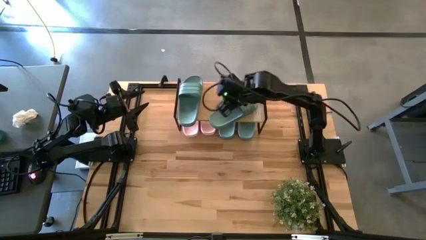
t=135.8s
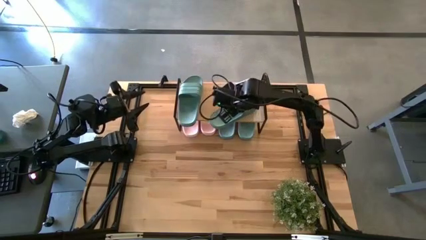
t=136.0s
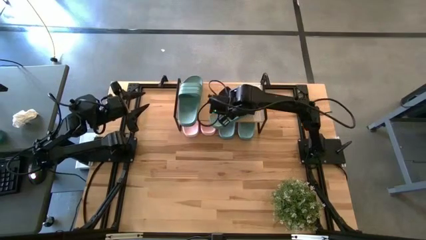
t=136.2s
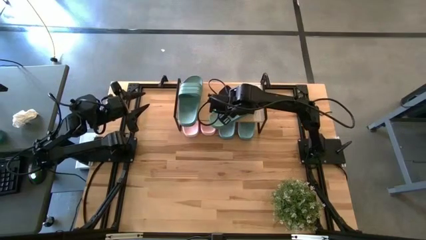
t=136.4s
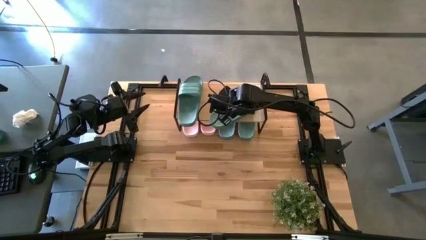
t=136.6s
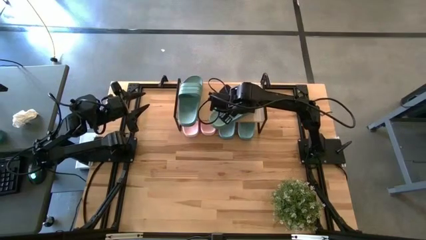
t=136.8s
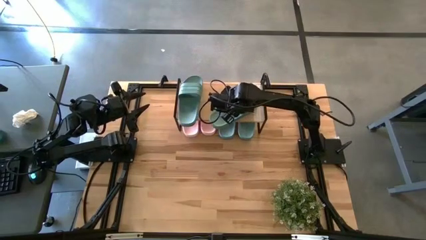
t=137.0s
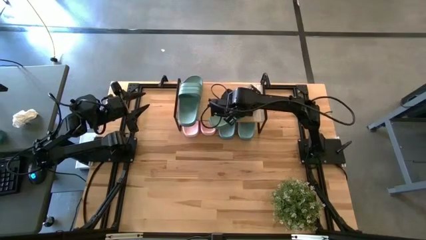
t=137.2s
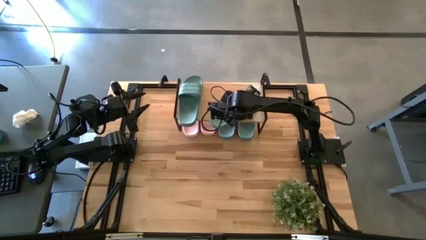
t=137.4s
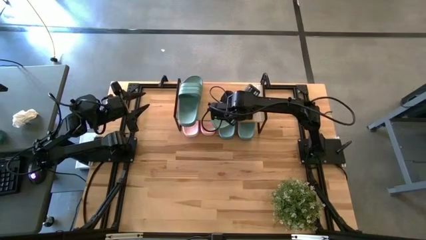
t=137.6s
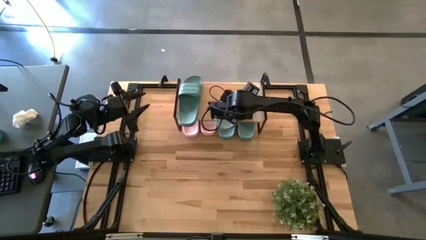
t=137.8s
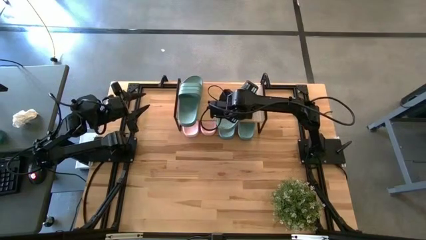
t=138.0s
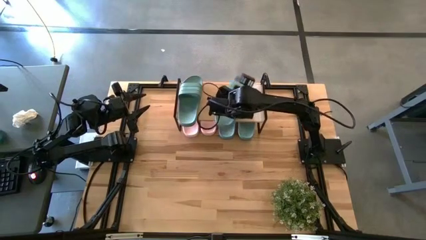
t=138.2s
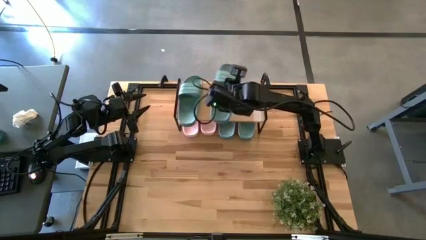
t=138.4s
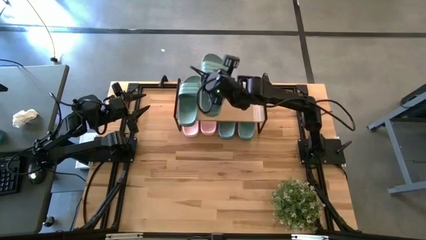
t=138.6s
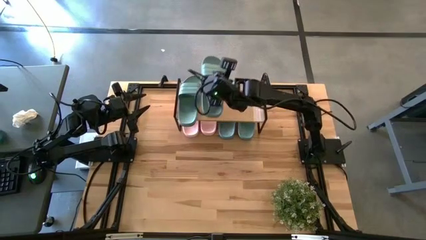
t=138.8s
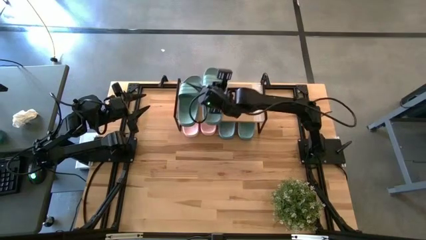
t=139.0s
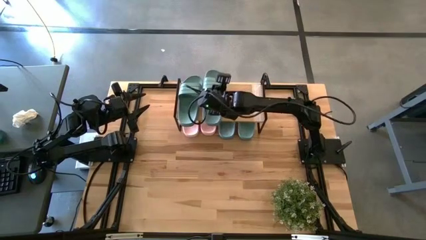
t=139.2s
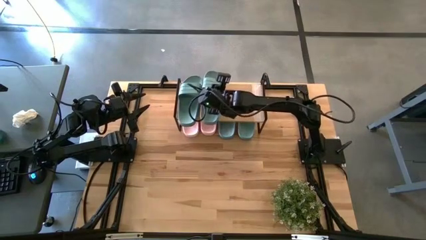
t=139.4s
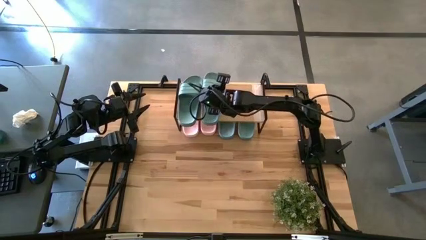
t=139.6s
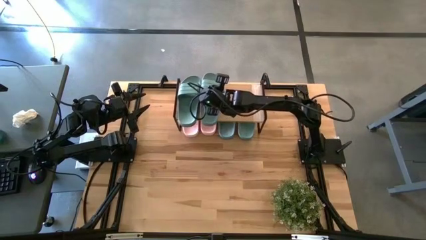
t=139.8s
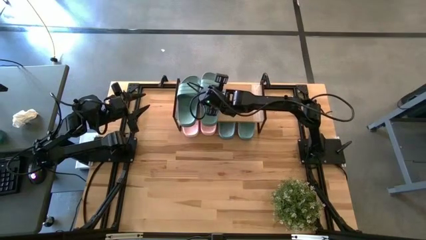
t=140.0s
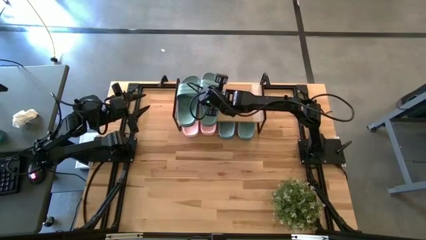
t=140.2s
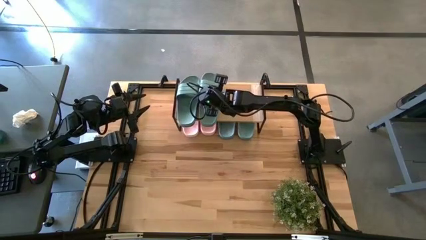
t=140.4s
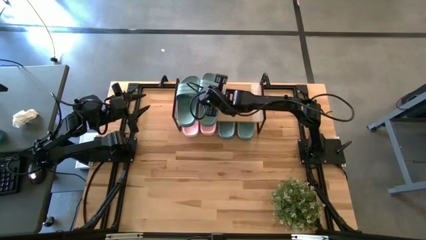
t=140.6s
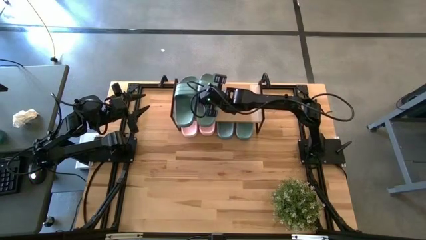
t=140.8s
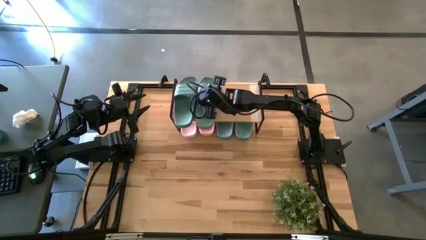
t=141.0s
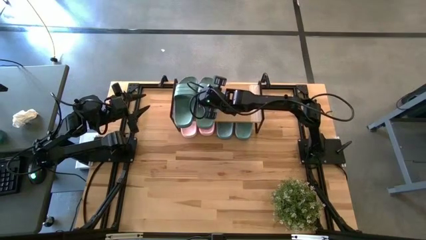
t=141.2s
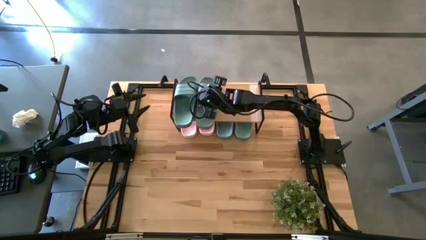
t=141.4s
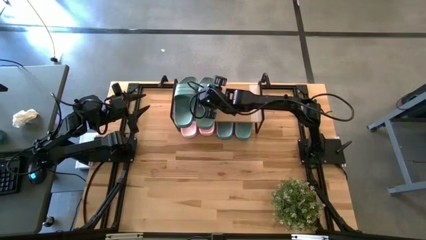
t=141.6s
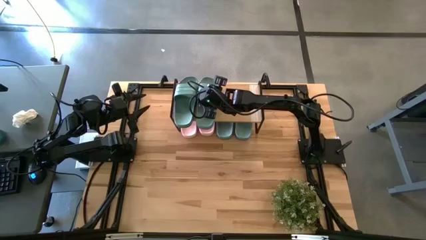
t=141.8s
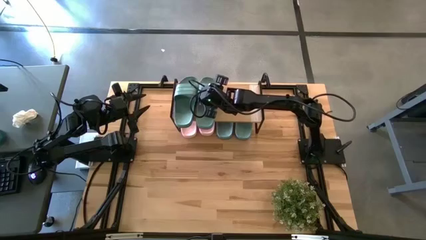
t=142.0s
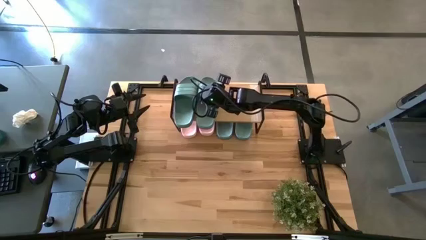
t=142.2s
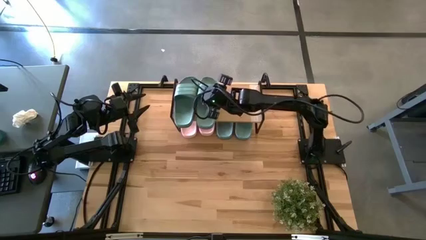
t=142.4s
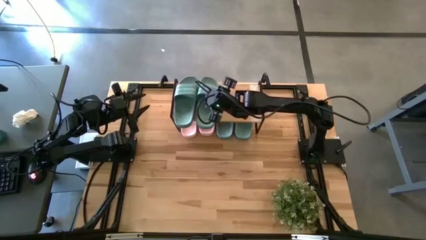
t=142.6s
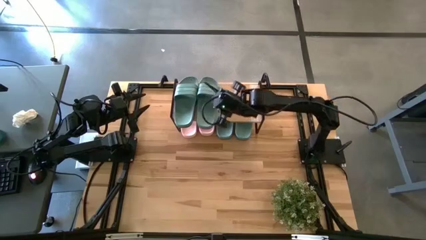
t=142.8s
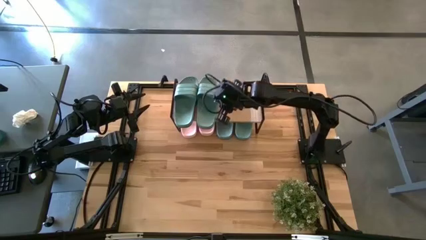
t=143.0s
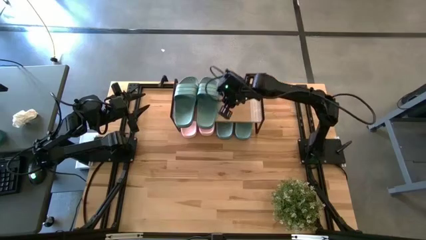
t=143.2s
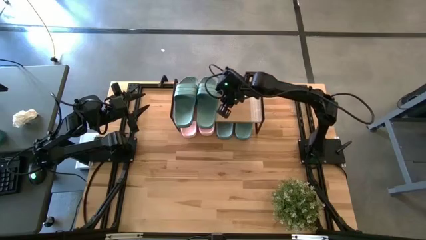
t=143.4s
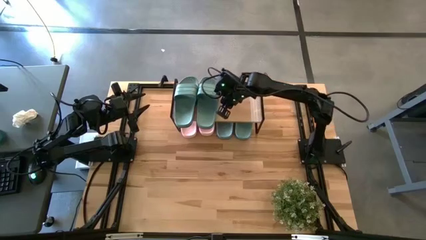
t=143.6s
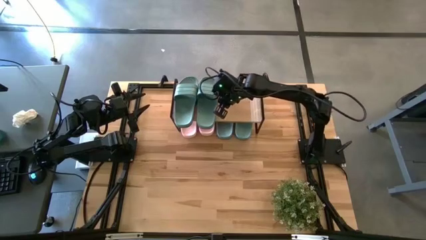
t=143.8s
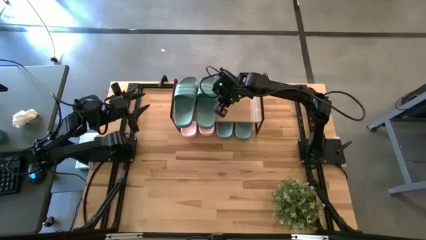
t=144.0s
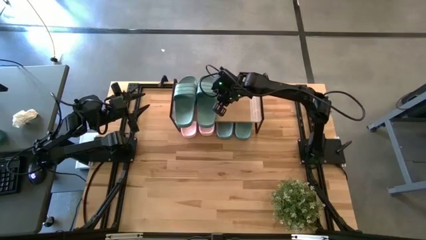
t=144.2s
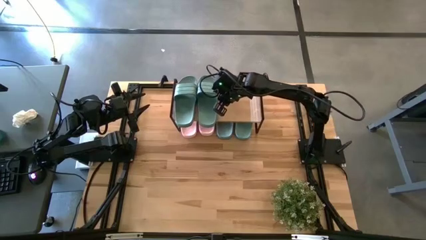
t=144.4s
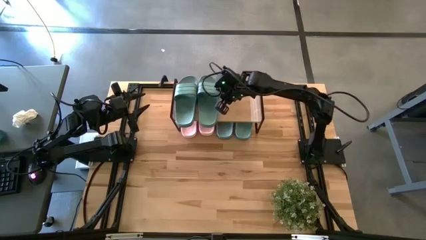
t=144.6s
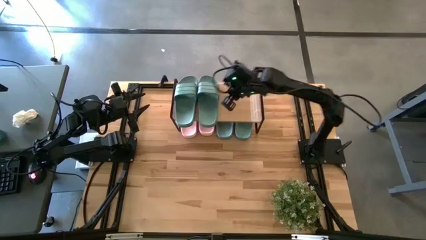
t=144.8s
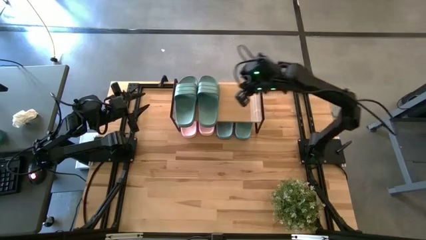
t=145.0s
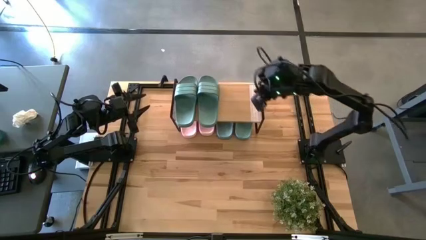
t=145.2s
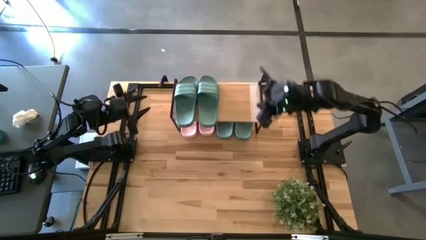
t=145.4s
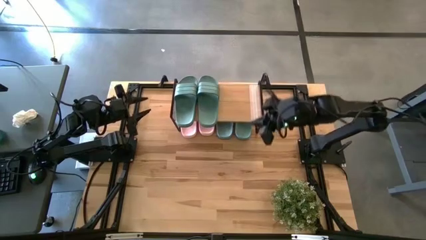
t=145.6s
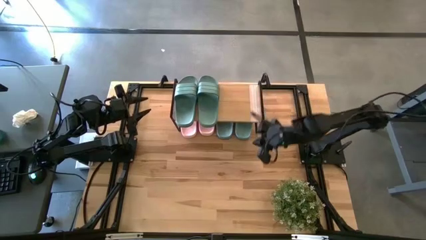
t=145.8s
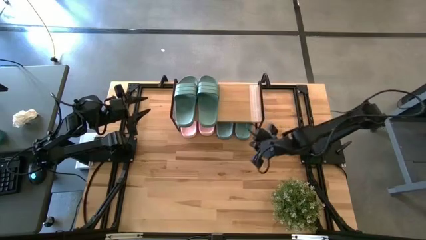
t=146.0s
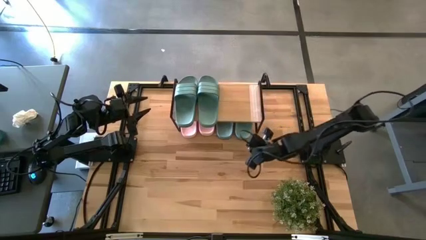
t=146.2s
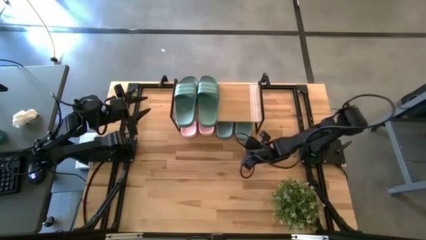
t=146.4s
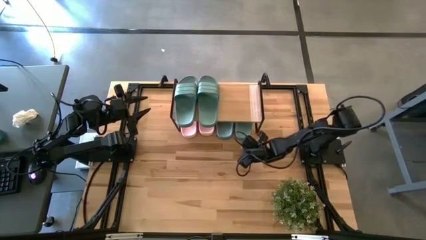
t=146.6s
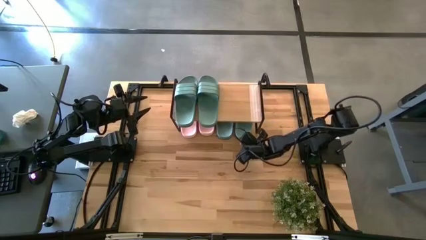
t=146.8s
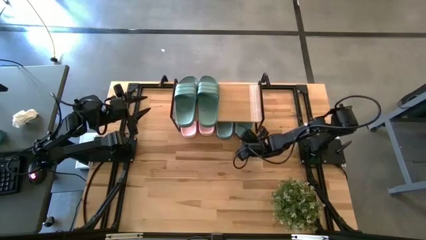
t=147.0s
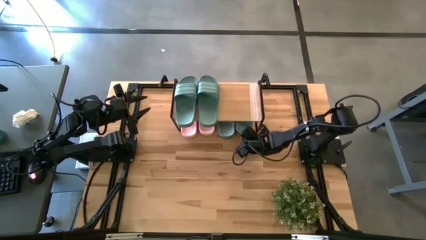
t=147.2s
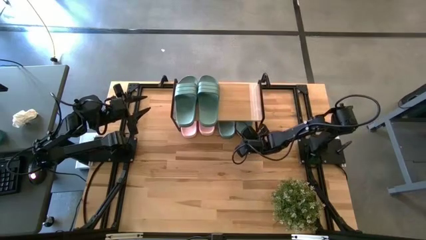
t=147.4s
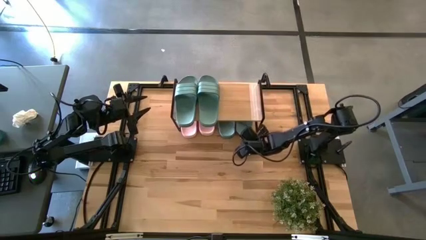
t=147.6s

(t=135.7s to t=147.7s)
Task: Pick and place slides into the shelf
Adjust the green slides on and under the shelf

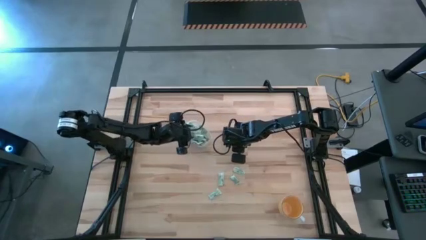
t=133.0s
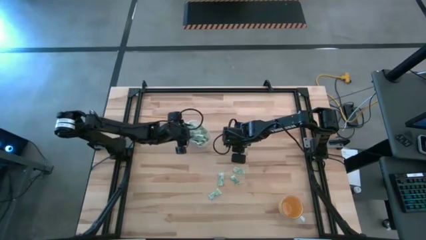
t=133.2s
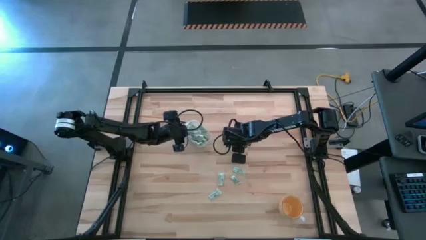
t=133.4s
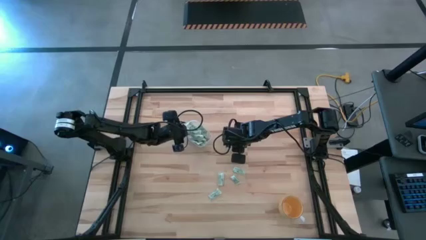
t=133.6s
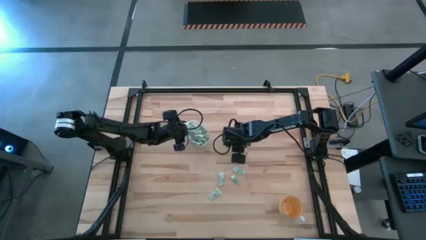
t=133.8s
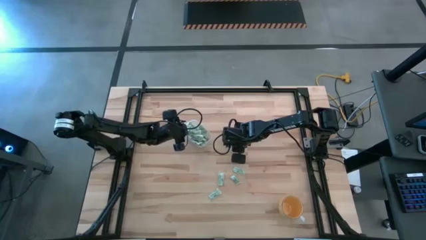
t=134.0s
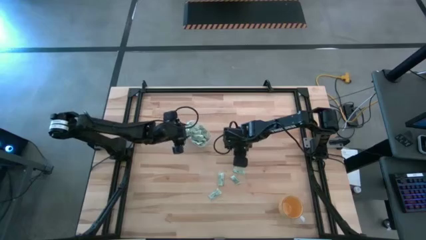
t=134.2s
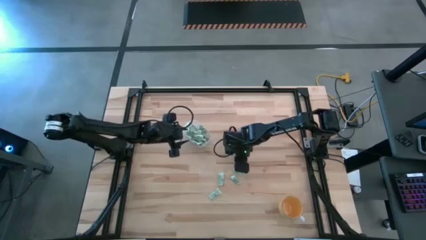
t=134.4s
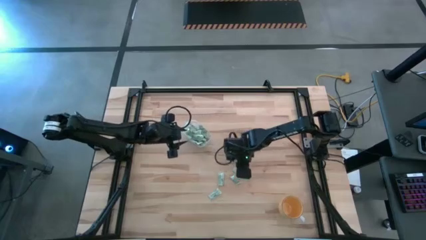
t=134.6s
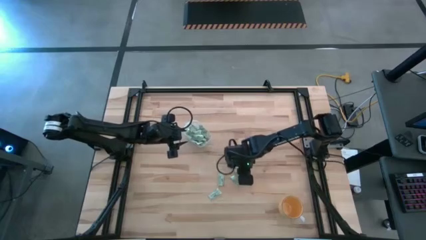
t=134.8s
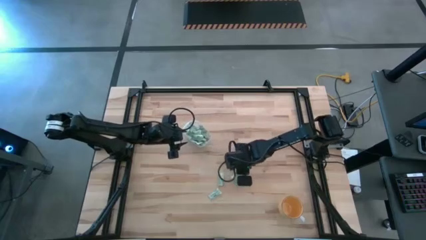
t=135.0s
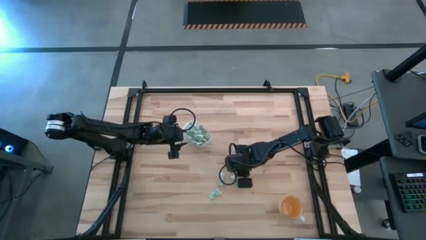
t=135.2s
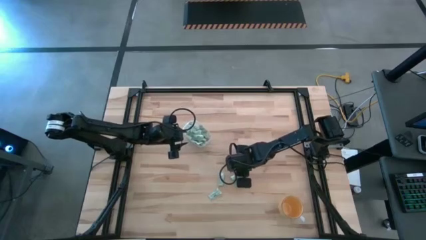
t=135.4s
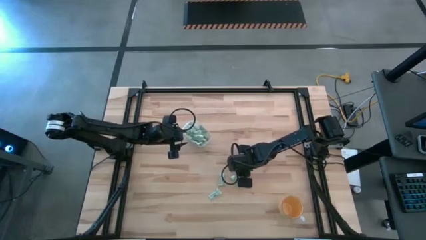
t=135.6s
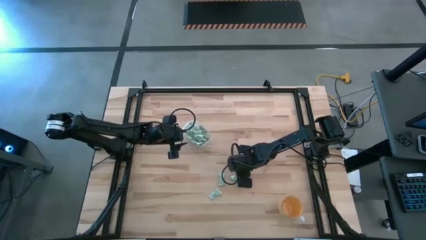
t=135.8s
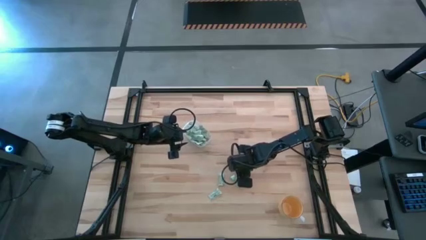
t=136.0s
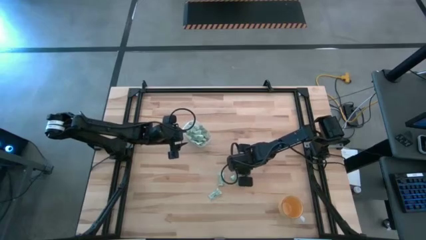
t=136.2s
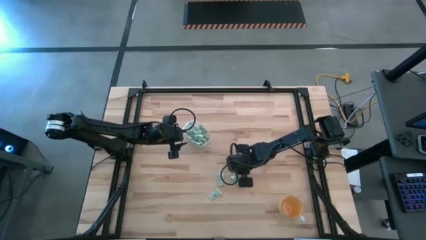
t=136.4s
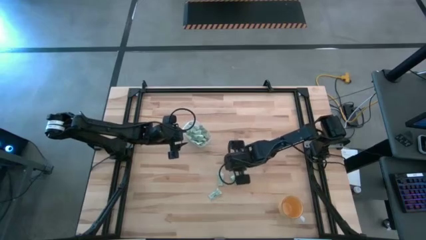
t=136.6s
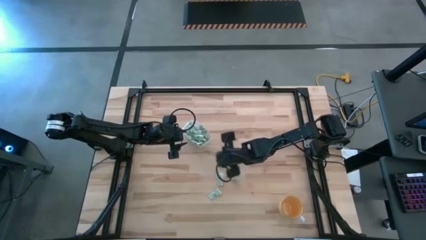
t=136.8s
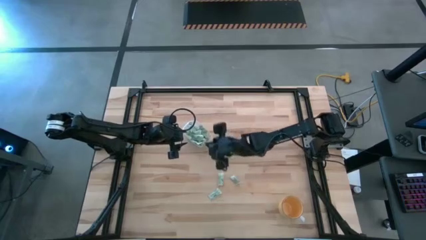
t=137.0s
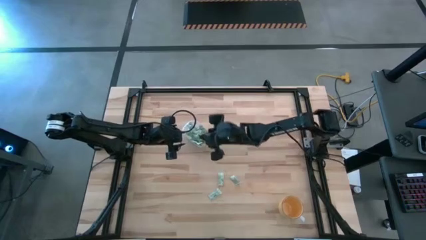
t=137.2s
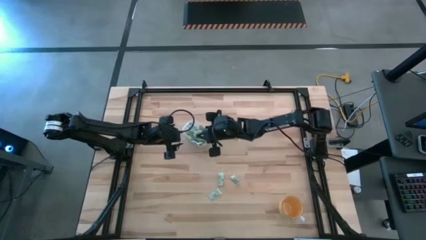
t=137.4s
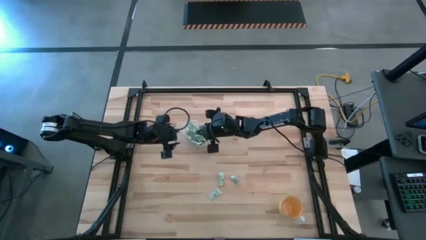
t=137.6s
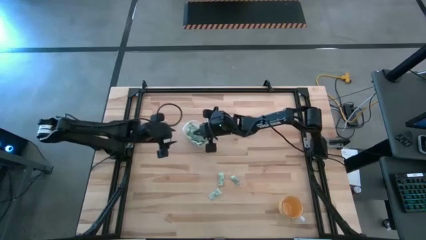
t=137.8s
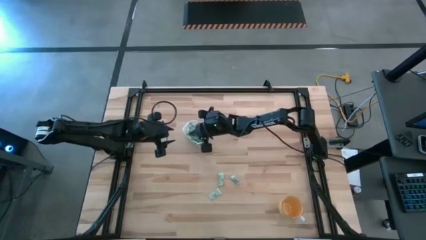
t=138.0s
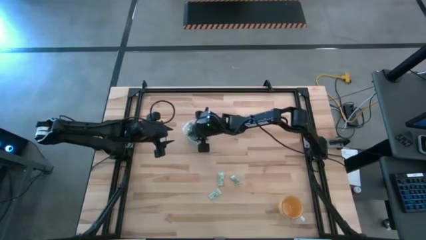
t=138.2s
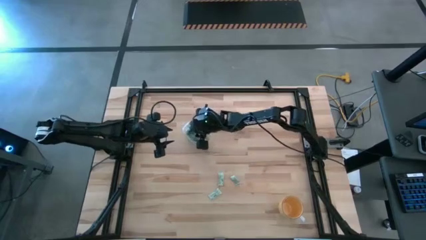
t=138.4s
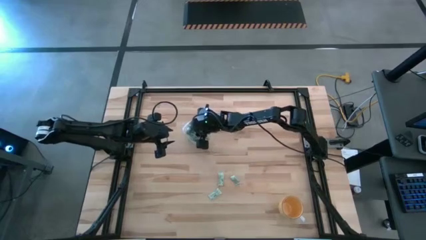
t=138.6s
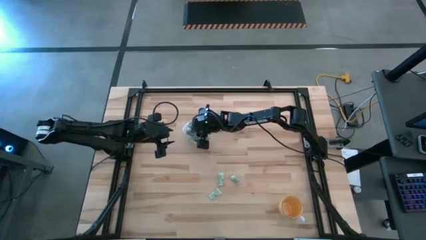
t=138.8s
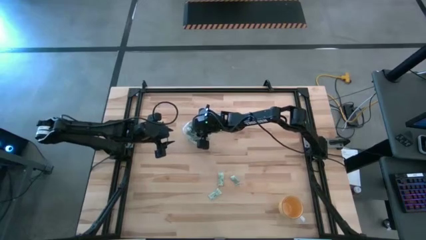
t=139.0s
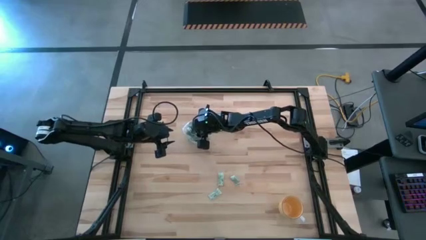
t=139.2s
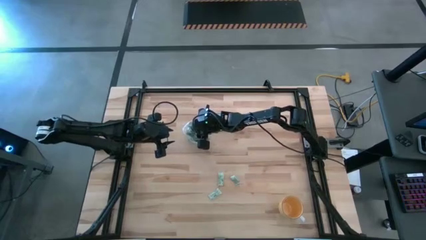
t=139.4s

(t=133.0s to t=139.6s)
Task: Pick and place Stevia / Truvia into bins
Put the stevia packet into the transparent bin
